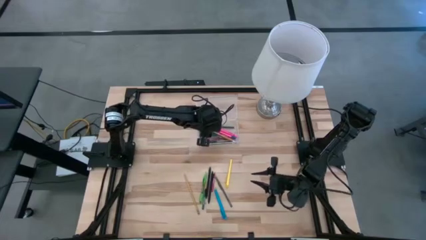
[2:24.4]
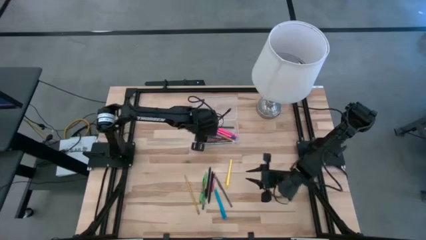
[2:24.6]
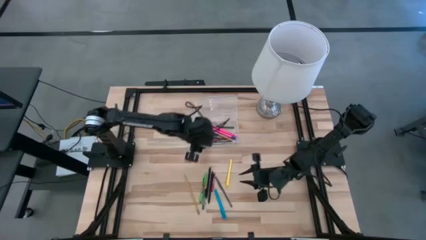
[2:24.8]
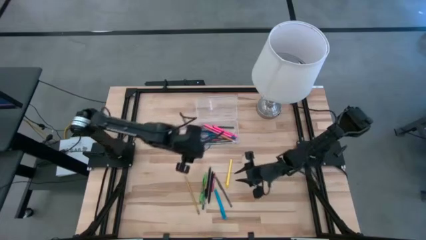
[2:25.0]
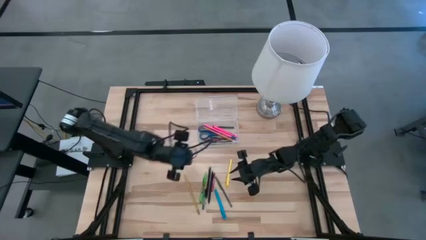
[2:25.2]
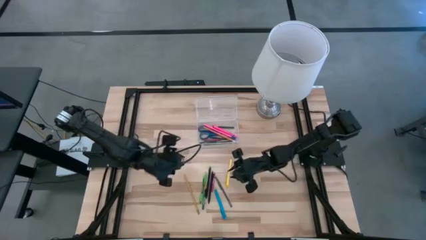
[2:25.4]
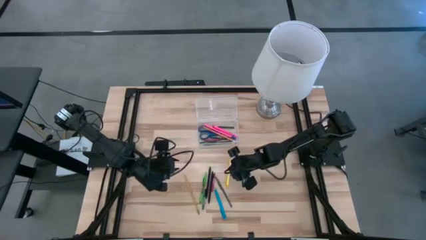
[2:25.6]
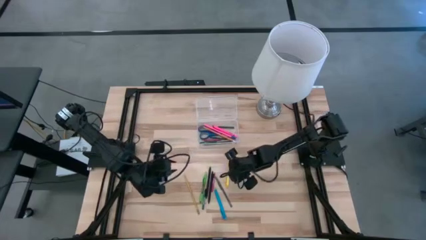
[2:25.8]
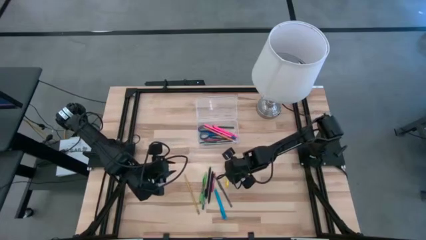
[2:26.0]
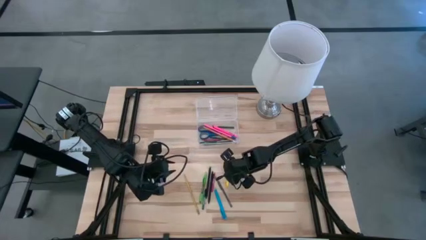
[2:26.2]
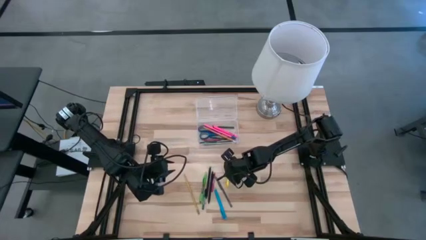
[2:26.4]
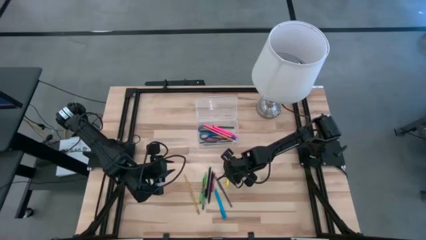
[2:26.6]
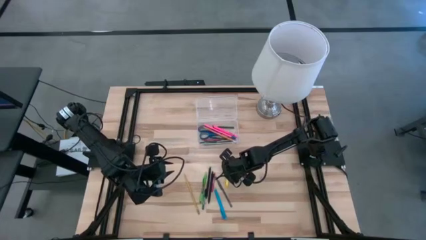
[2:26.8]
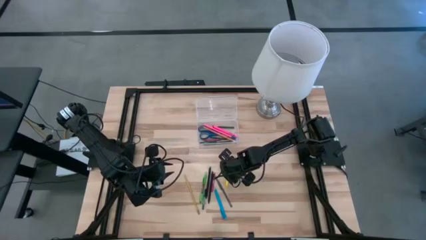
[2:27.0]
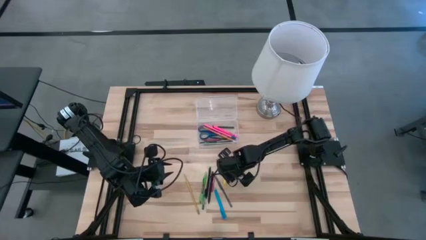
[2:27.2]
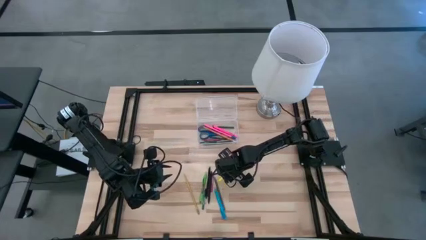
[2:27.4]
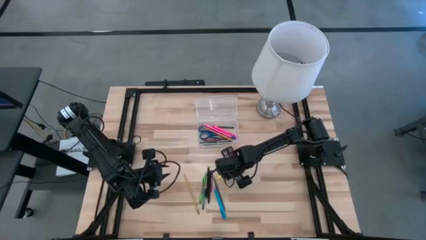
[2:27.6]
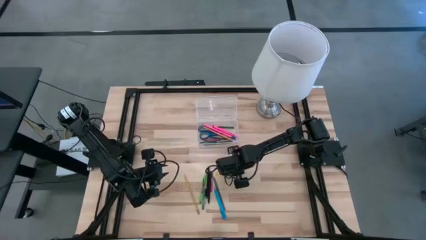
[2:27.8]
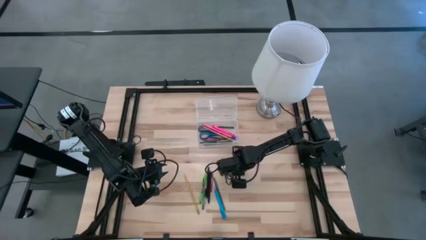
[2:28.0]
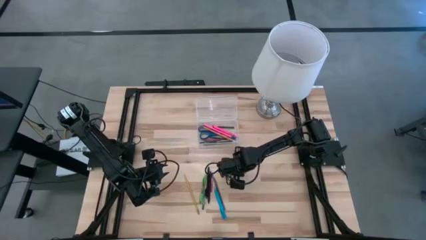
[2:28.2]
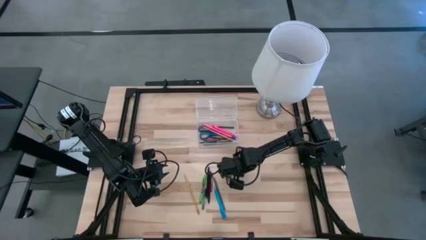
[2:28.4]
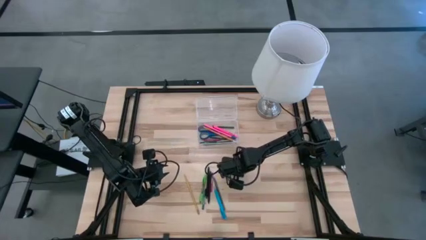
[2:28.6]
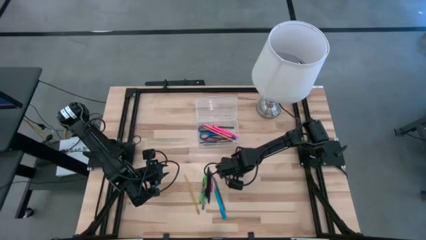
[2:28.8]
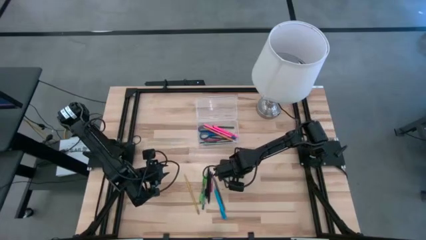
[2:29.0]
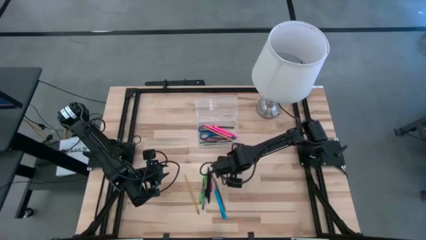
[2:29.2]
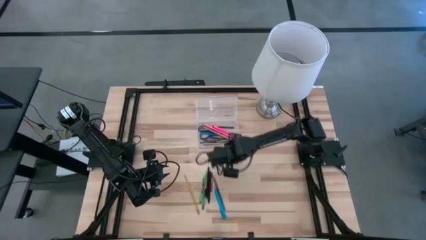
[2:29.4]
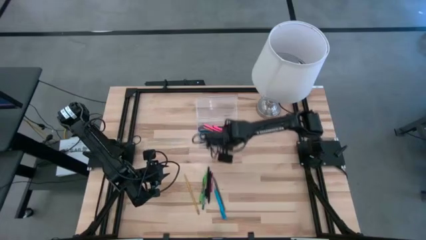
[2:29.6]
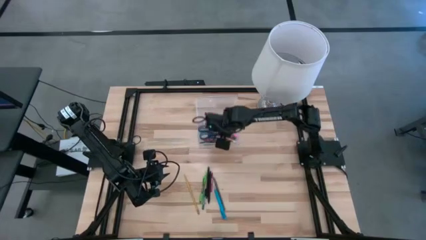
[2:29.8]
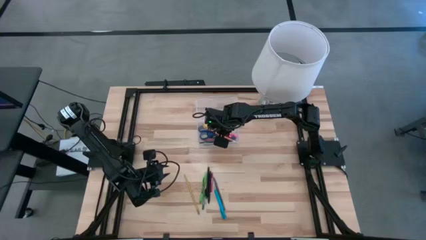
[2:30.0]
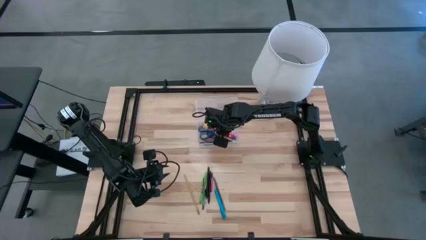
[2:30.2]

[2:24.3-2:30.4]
Task: Pick & place school supplies into a supply box
Put the yellow pen into the supply box

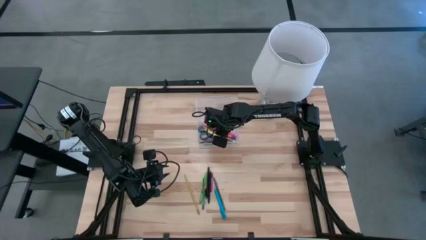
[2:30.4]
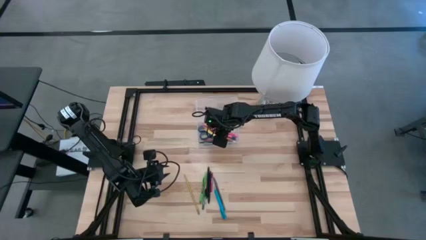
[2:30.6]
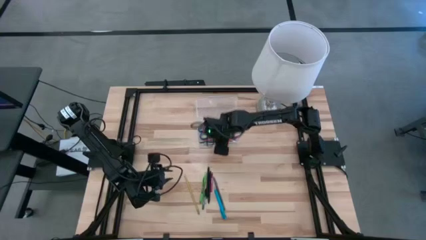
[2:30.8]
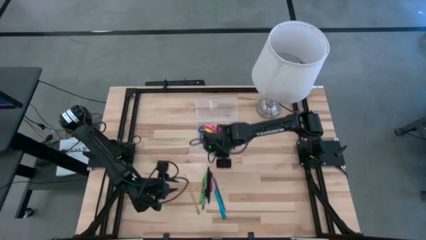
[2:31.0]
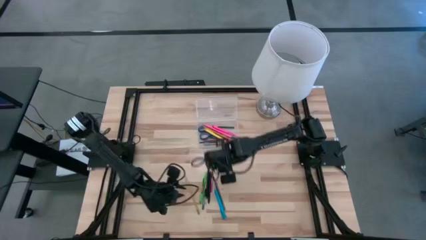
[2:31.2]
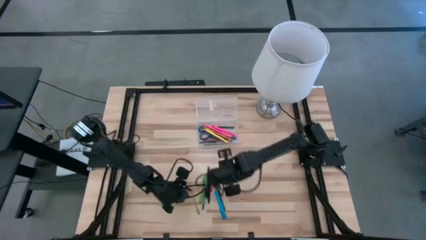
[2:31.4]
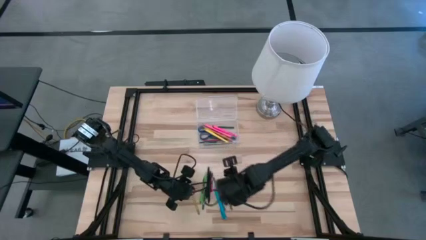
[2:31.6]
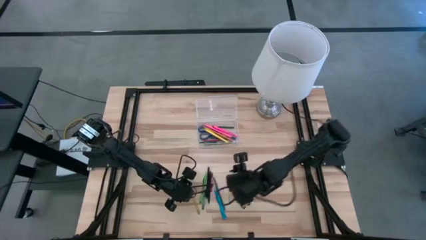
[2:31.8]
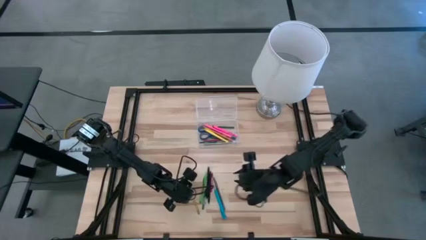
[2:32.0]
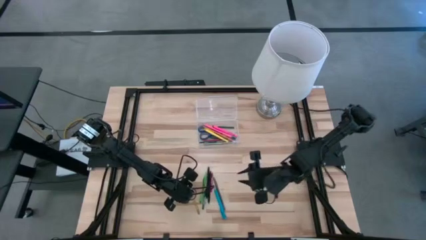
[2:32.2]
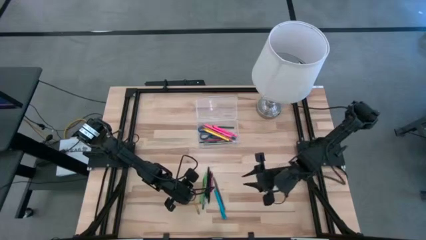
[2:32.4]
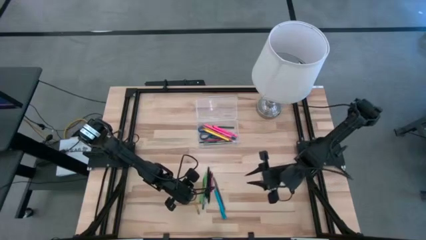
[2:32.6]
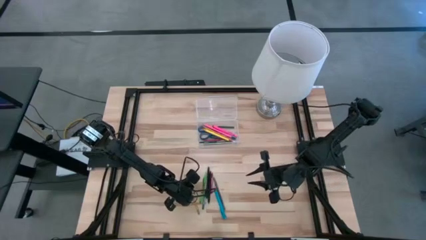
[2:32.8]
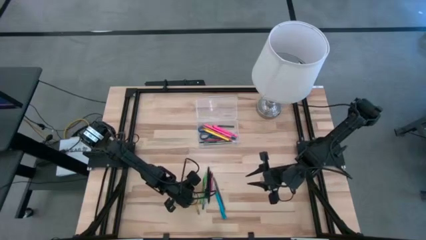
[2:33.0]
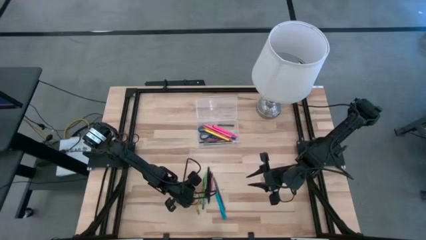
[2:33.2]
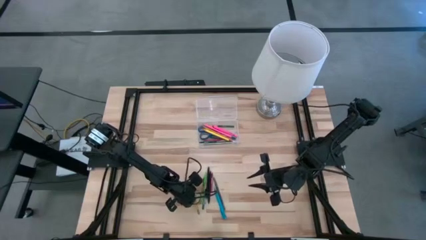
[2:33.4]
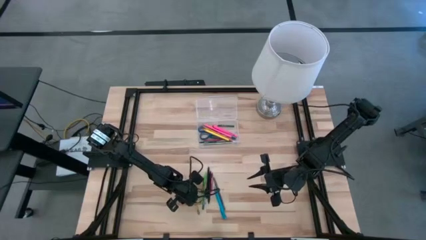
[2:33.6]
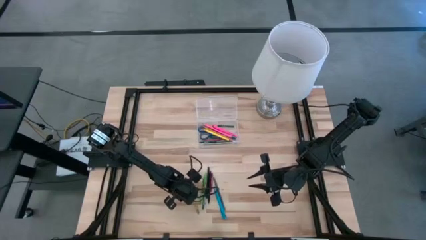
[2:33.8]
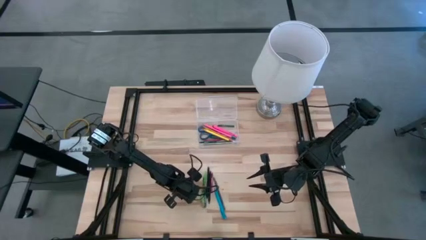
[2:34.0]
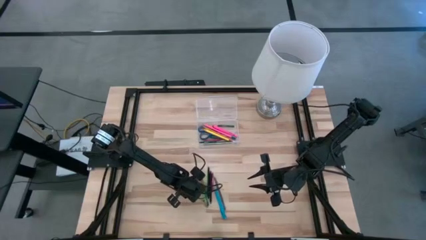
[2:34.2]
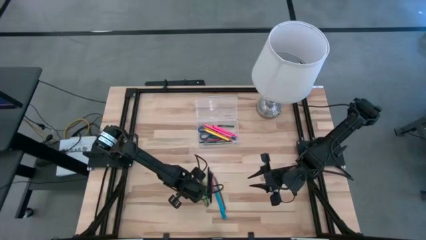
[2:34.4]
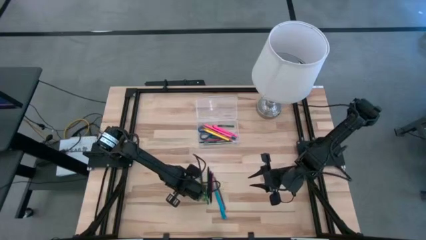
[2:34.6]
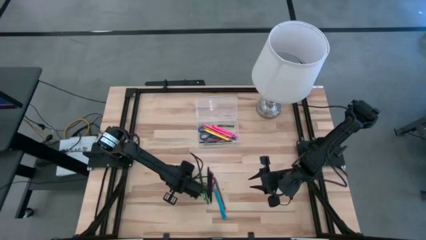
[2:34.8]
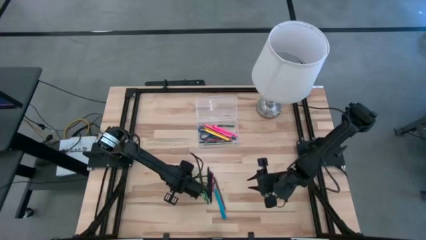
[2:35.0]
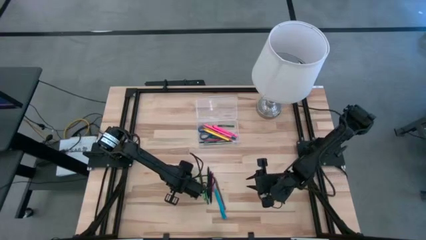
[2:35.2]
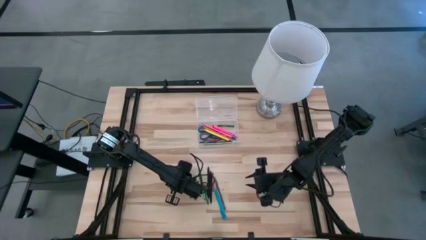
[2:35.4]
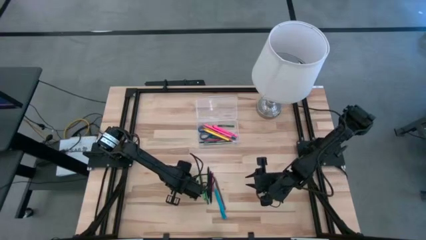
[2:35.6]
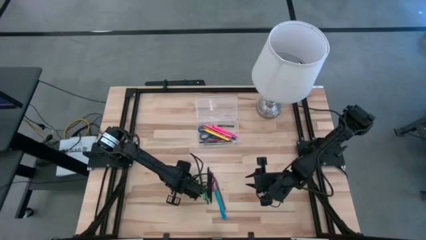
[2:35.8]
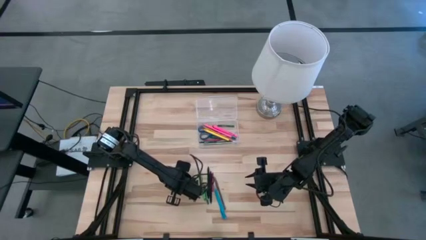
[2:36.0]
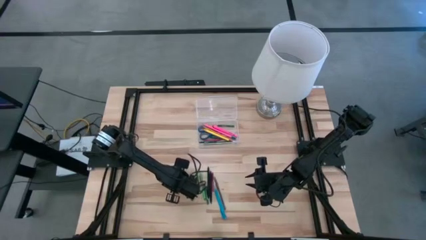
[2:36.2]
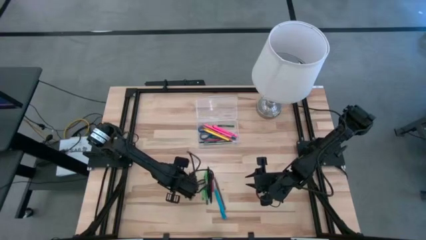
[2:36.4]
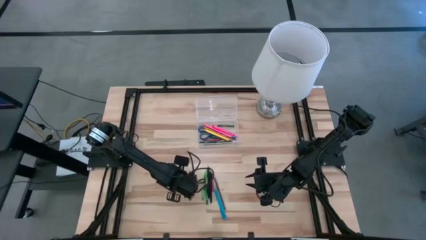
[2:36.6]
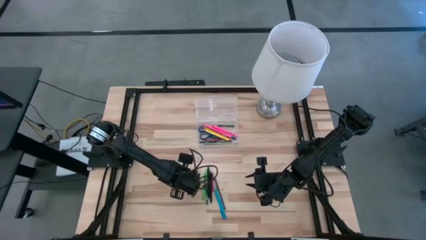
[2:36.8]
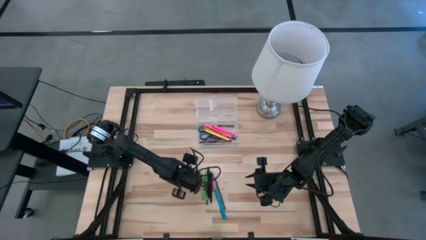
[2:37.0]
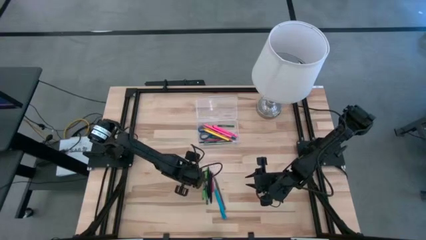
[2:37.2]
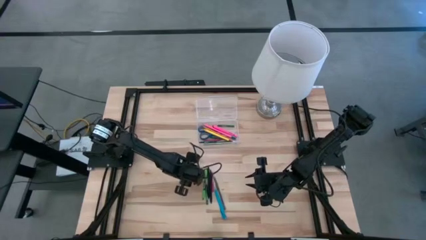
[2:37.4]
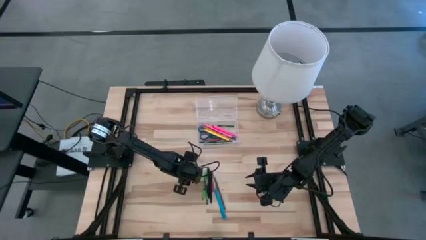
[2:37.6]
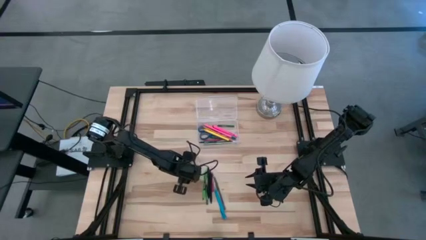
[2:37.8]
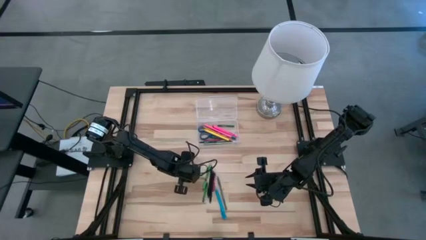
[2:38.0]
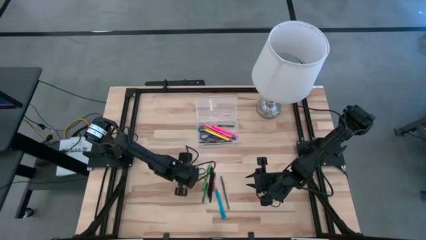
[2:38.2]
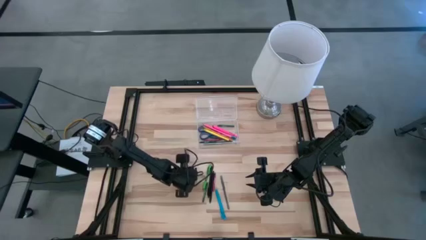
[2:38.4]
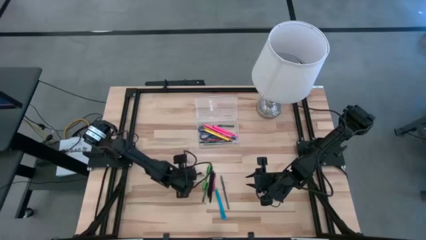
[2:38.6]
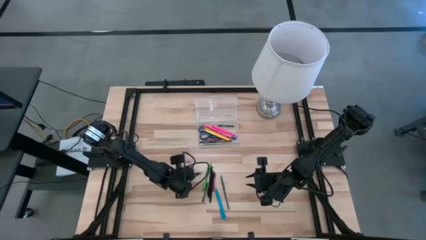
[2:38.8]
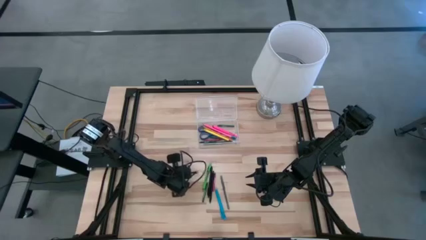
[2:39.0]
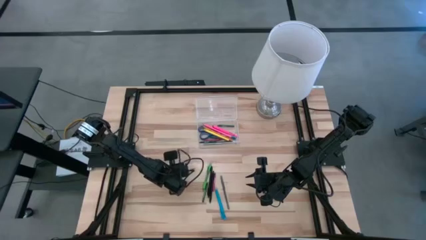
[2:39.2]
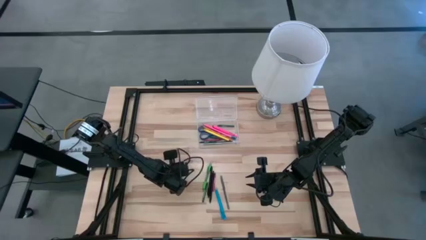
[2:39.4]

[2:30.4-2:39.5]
Put the yellow pencil into the supply box
